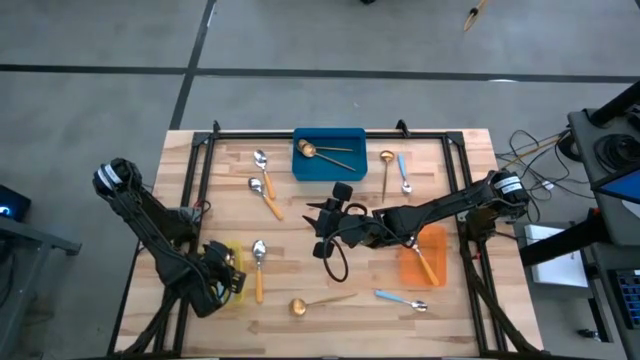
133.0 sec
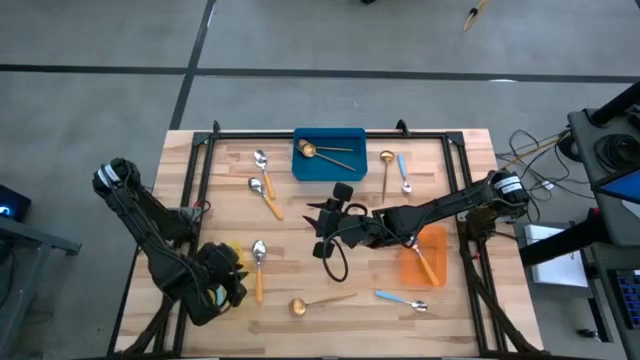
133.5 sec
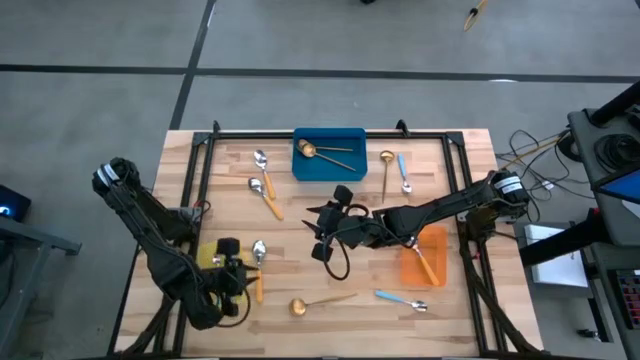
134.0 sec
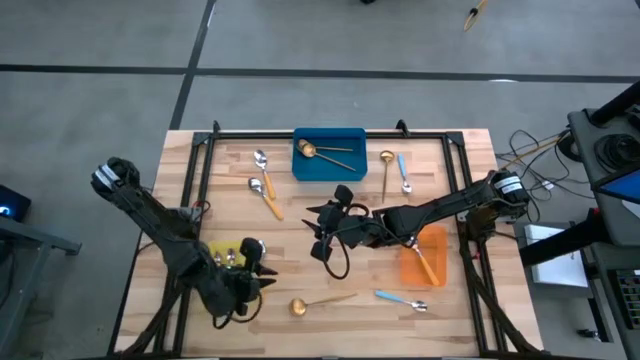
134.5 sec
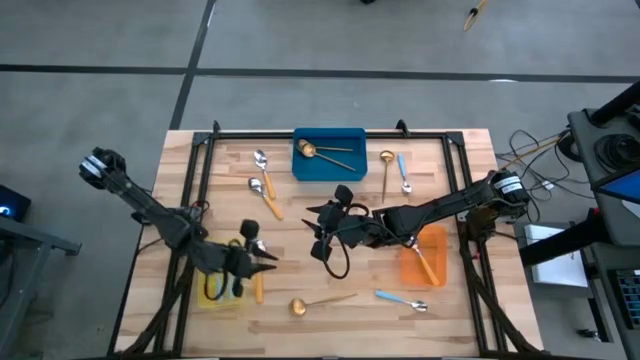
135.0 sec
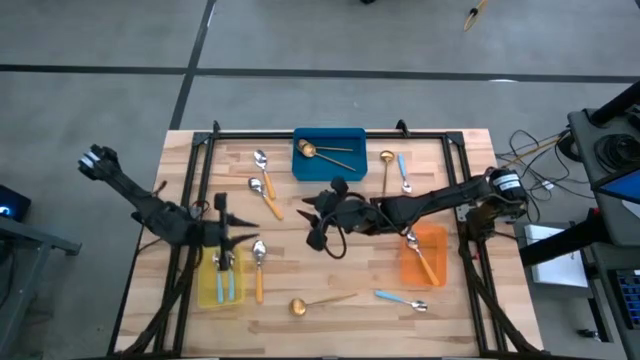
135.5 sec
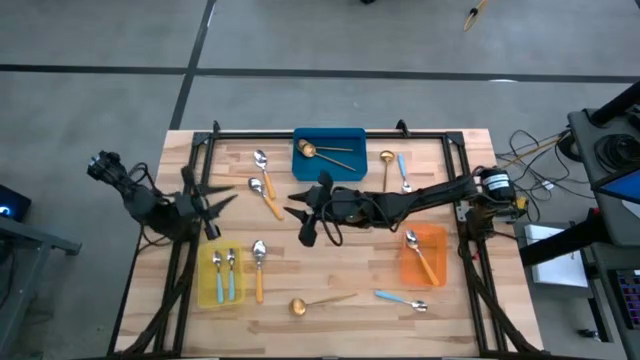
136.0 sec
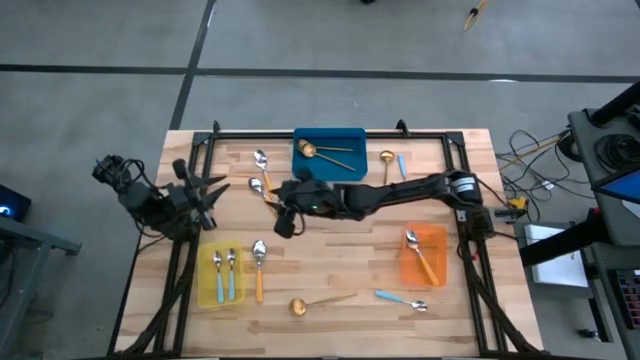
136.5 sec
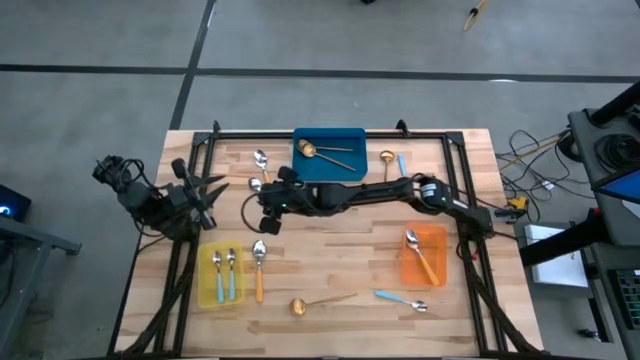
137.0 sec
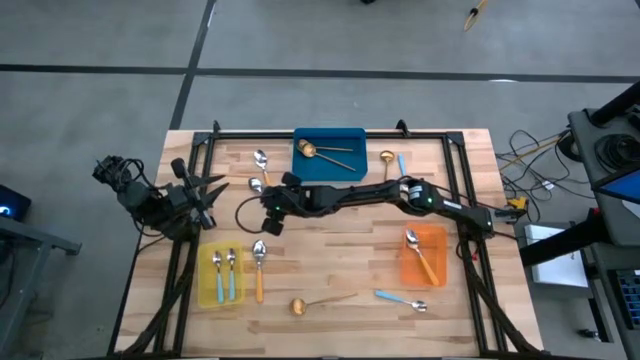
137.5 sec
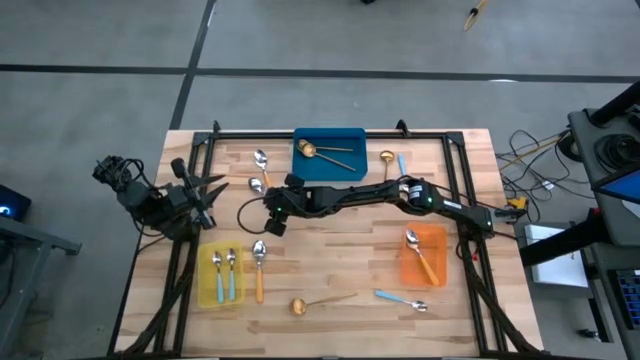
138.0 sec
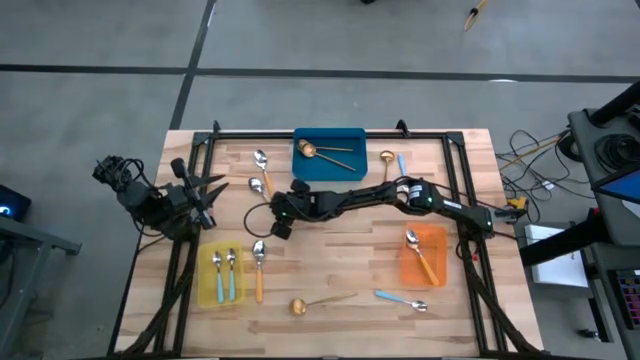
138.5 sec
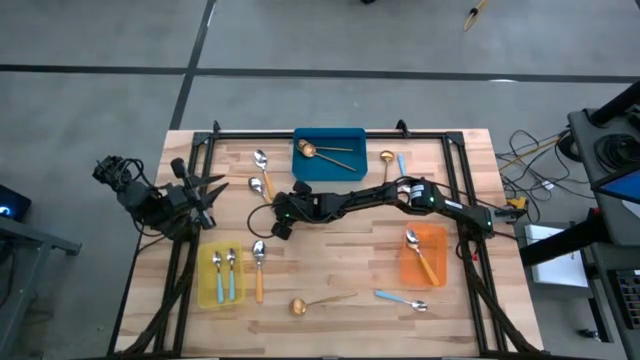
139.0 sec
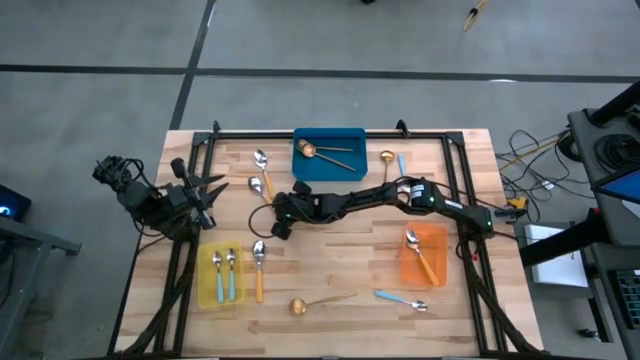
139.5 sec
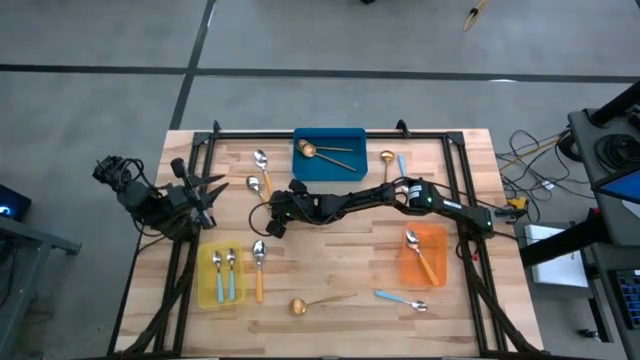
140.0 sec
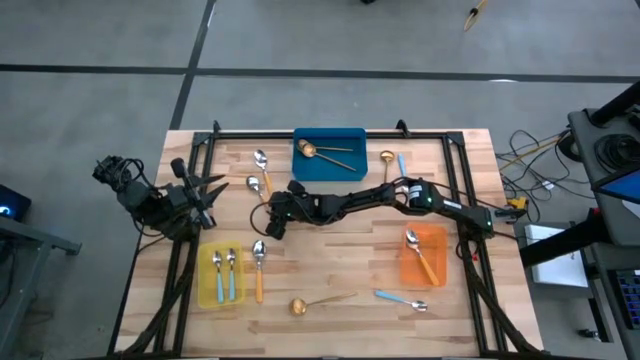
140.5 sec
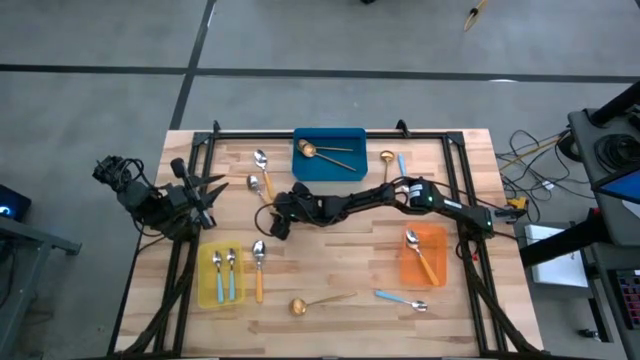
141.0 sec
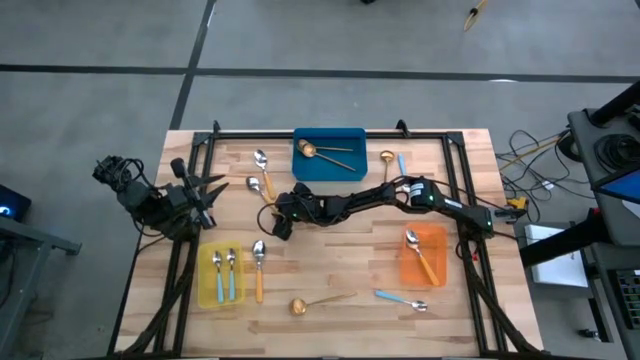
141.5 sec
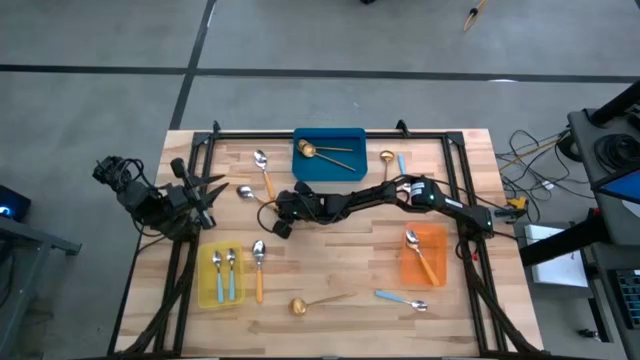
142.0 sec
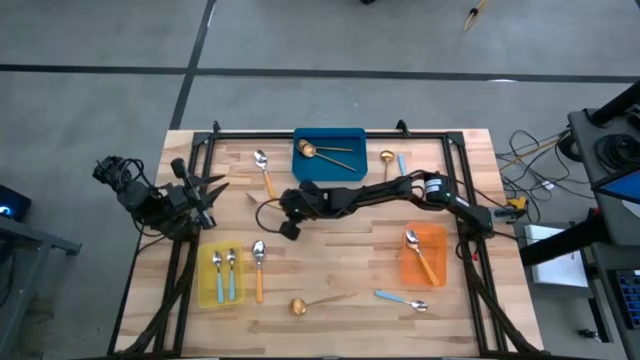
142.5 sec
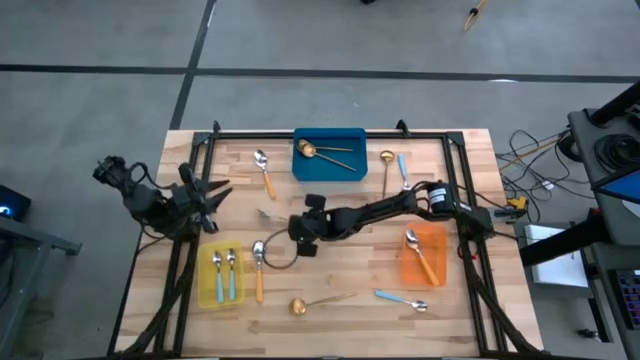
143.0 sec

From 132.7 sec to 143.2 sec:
Task: Sort silverware by color (type)
Put the orange spoon into the orange bin

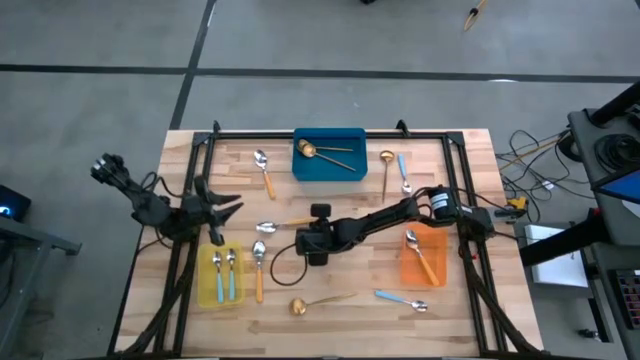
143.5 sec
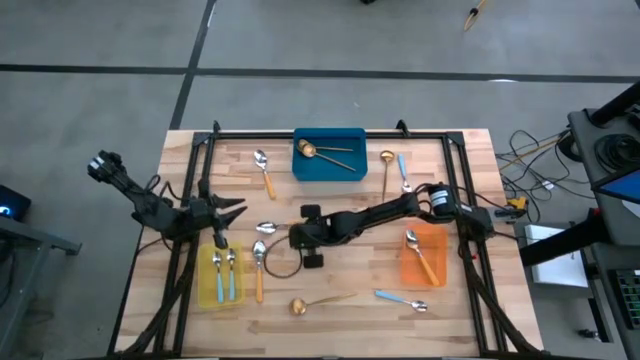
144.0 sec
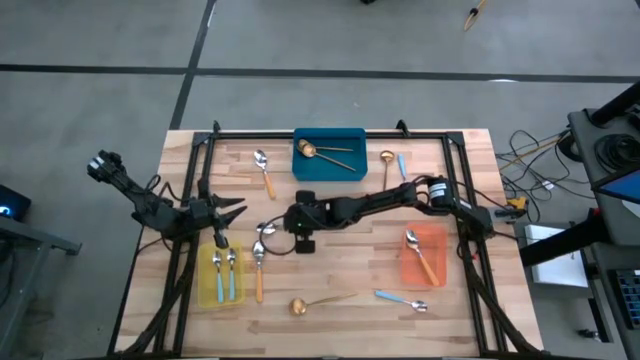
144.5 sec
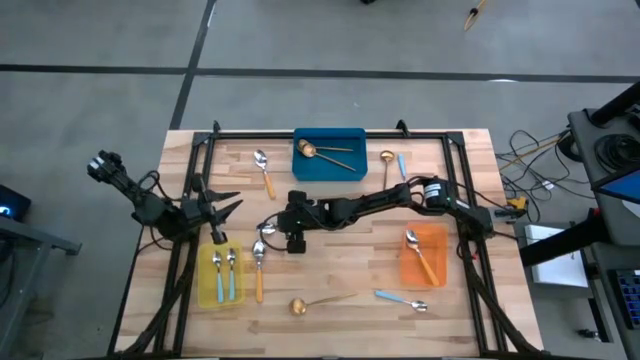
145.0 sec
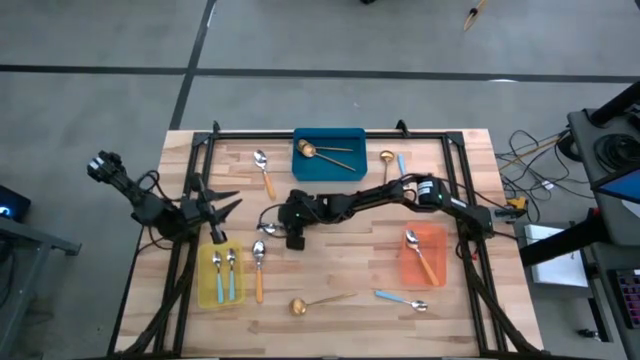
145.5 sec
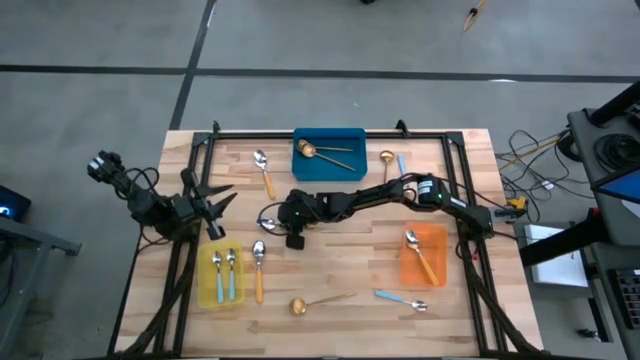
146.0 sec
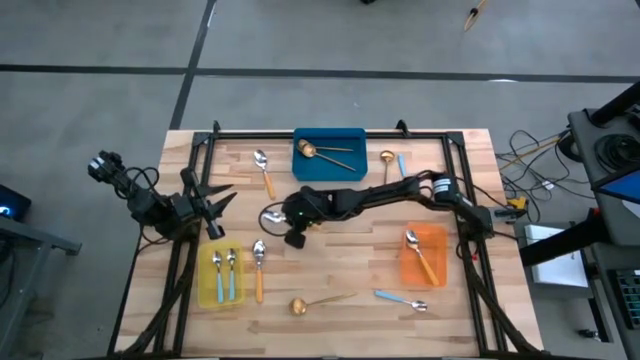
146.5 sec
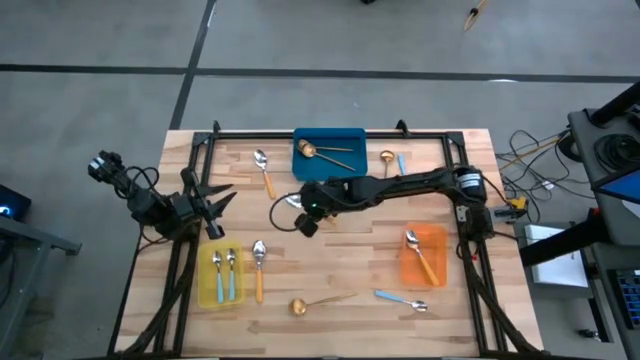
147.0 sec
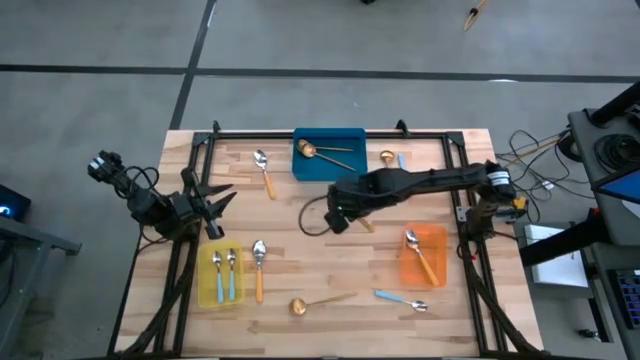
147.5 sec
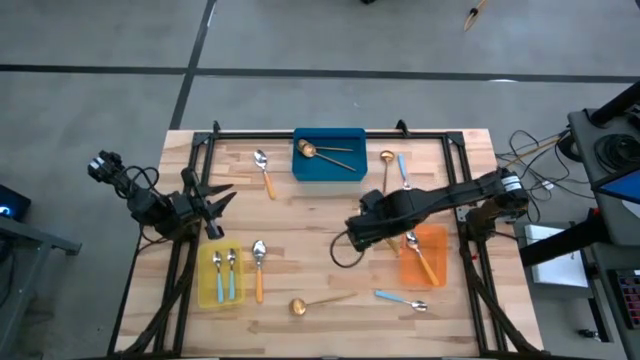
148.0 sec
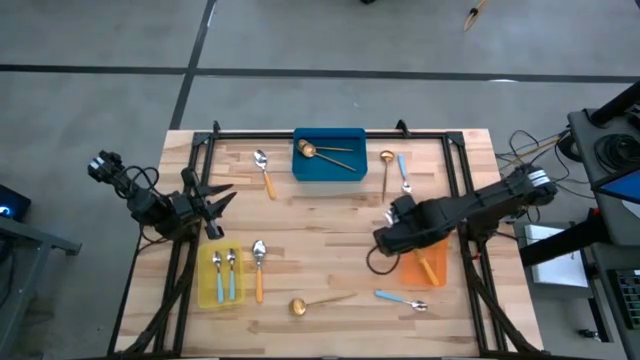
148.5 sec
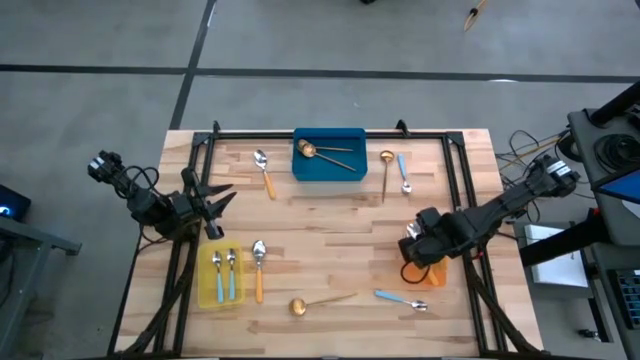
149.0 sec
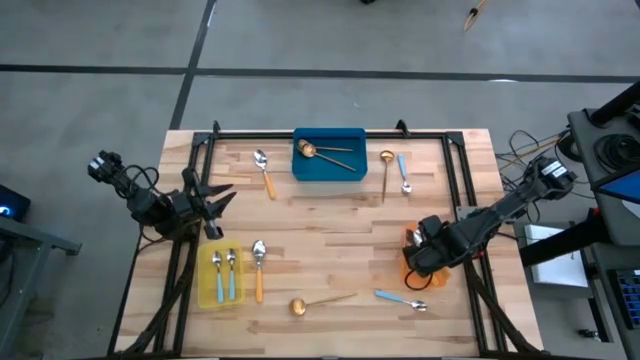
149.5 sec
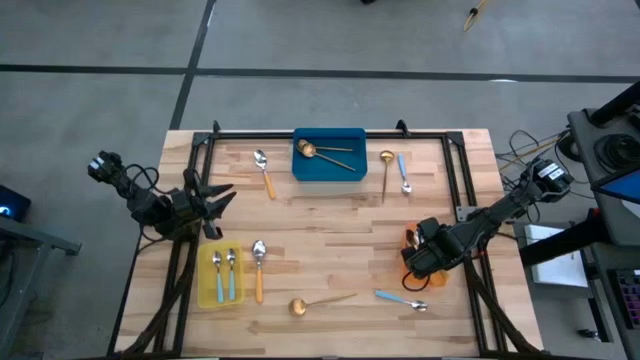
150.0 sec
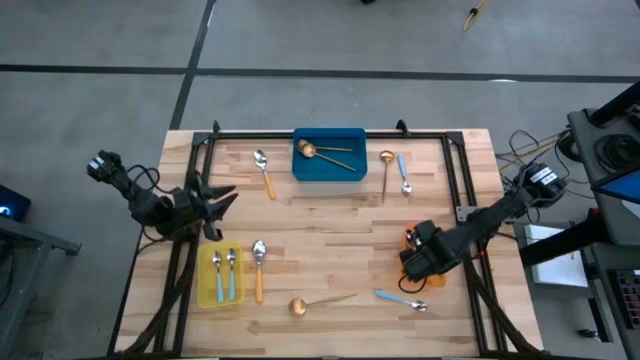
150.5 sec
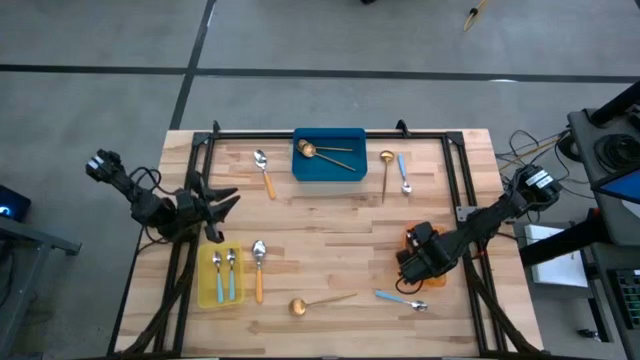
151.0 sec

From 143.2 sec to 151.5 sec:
Put the orange spoon into the orange bin

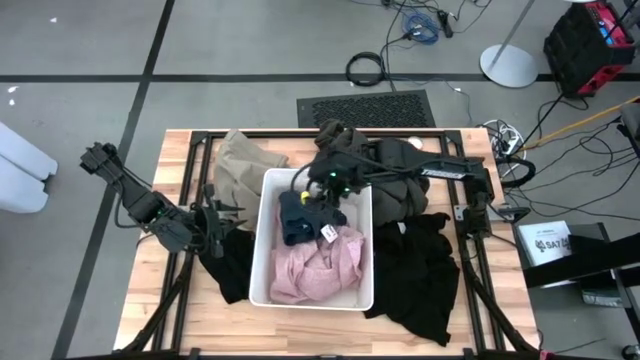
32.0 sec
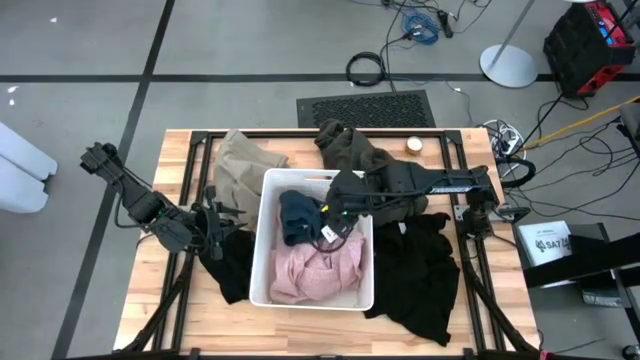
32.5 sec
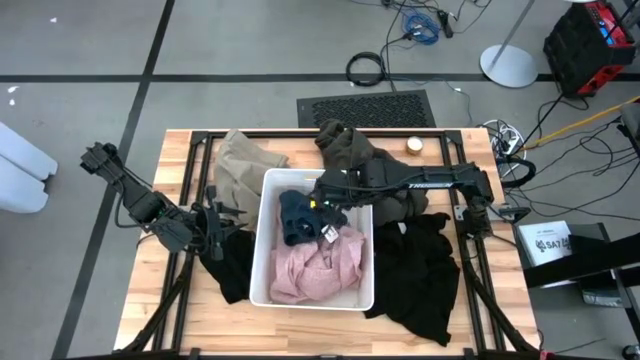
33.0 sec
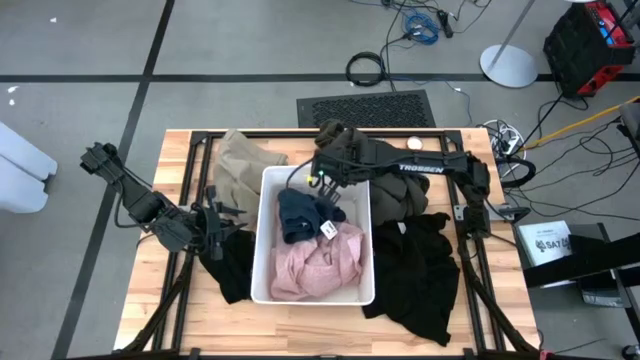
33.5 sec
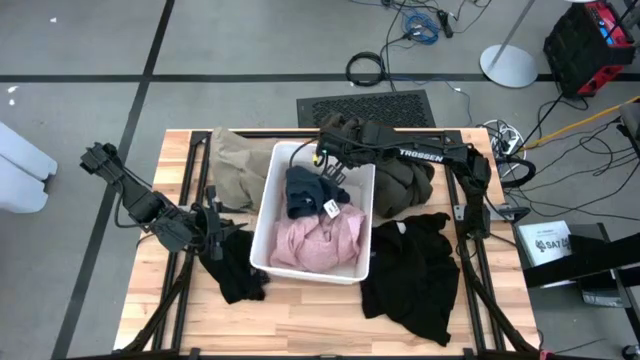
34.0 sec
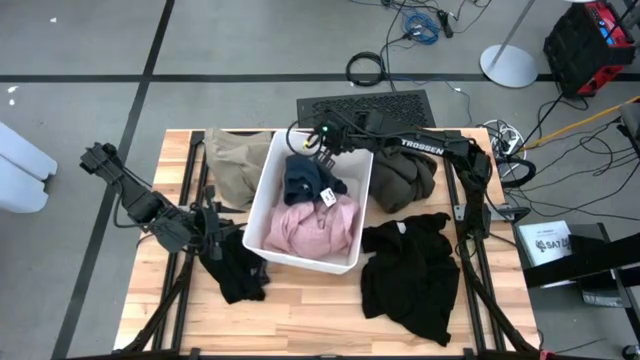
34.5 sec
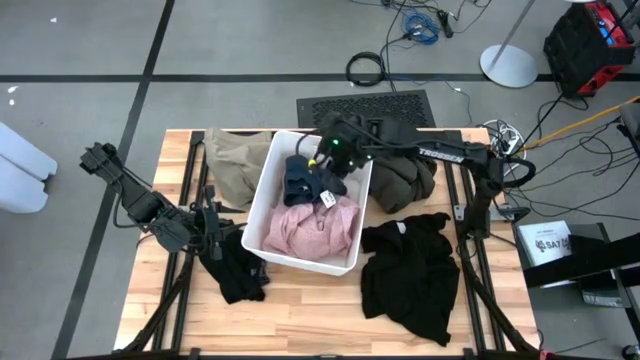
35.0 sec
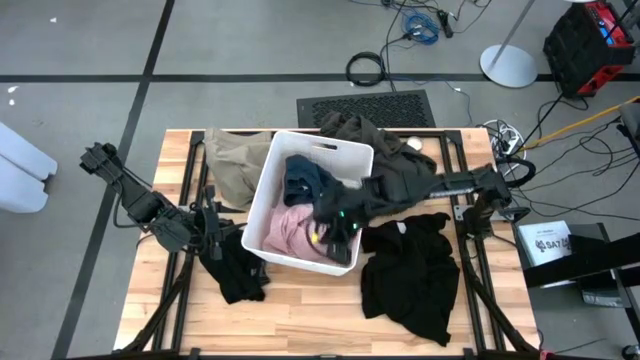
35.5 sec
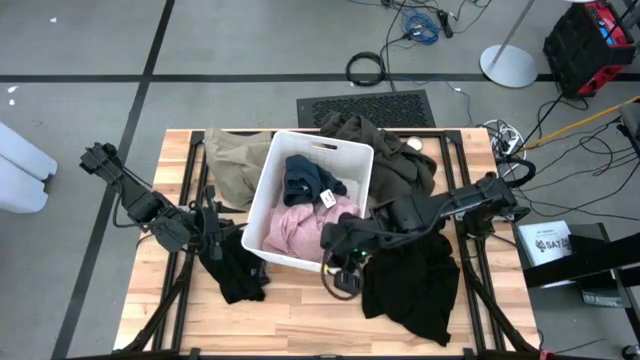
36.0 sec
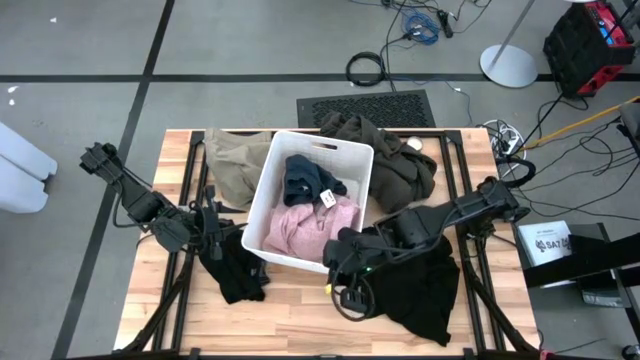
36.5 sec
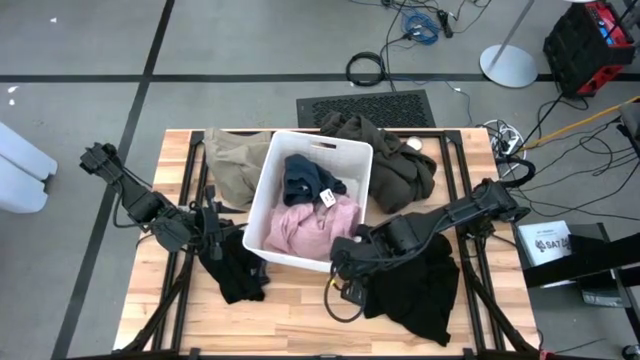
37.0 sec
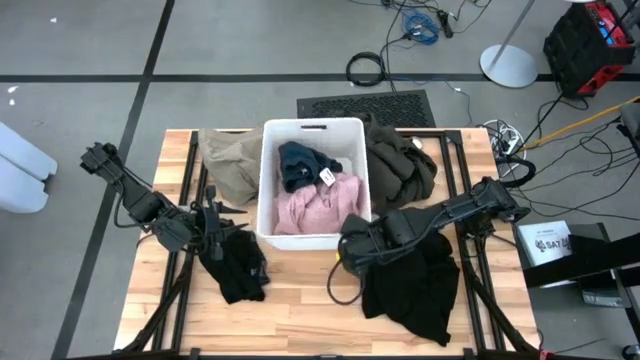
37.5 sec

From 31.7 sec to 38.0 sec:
Task: Sort clothes
Move the white laundry bin to the top center of the table
